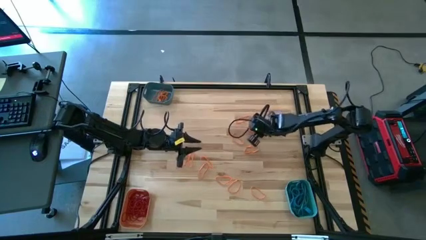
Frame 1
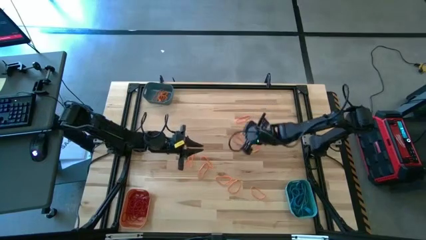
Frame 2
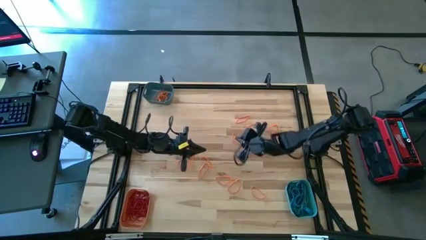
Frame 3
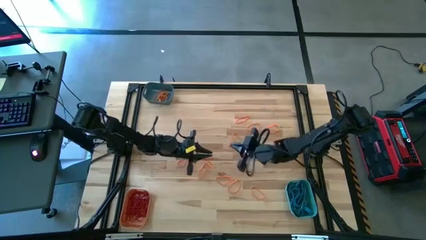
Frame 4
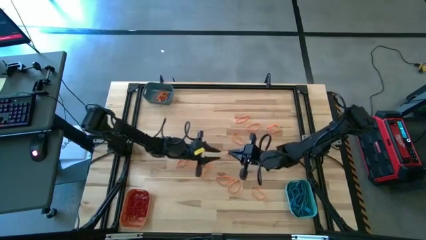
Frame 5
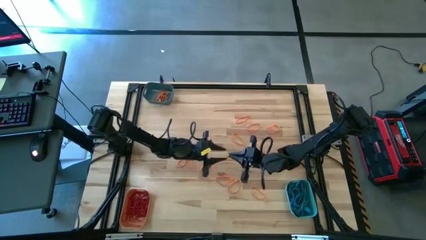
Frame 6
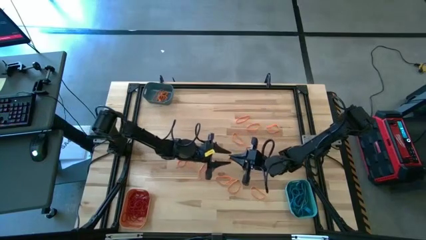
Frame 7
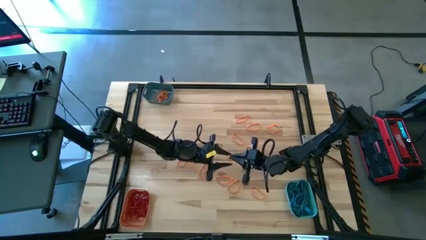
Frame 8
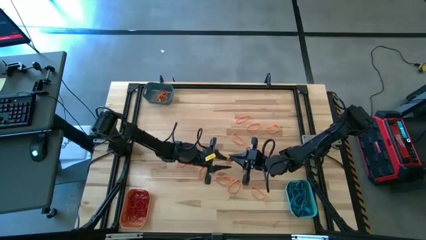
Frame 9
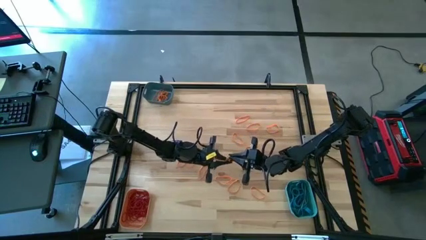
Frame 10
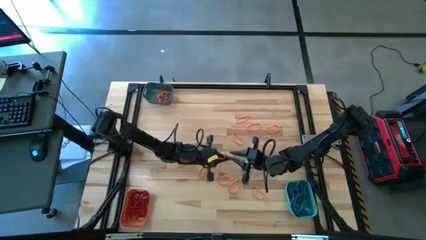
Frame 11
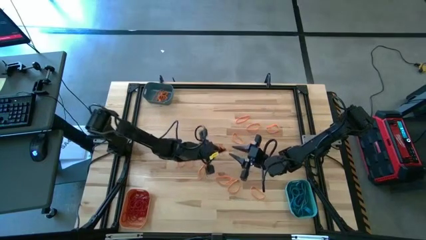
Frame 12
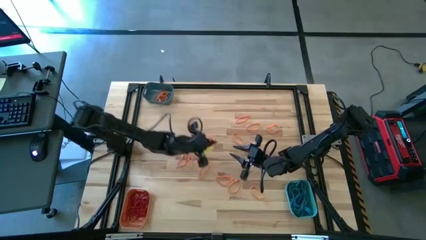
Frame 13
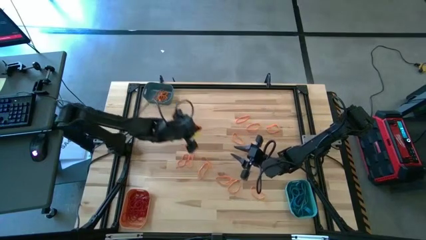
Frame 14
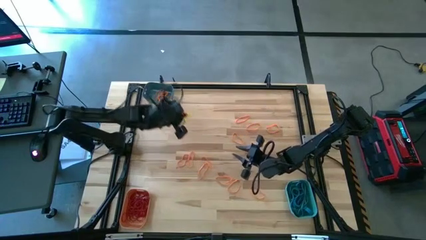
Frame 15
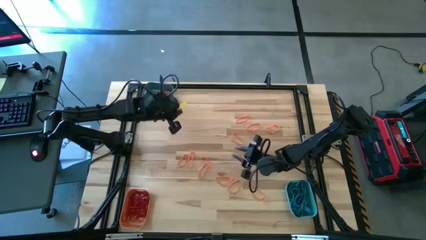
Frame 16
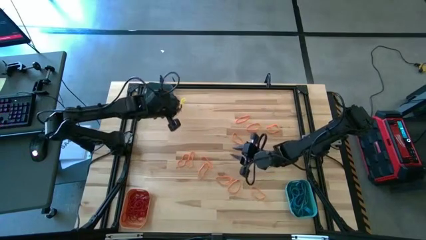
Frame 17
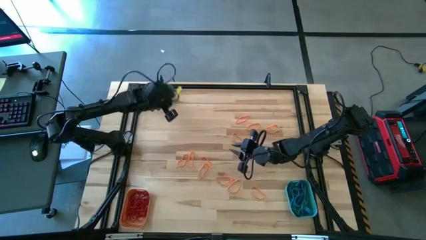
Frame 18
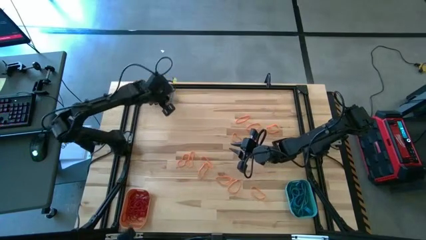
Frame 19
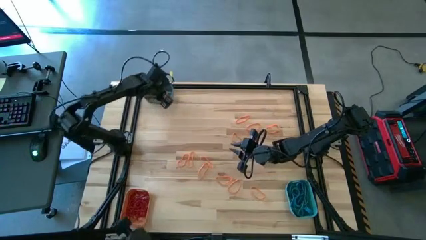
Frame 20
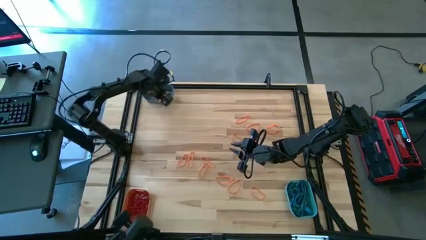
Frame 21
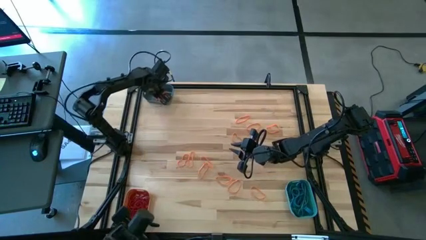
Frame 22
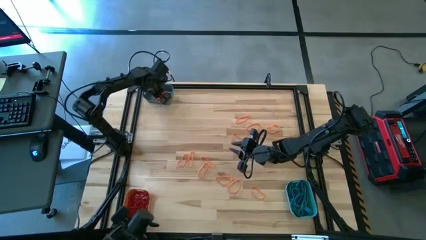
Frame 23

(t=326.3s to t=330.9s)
Task: Sort rubber bands into baskets
Put the orange rubber band into the blue bin

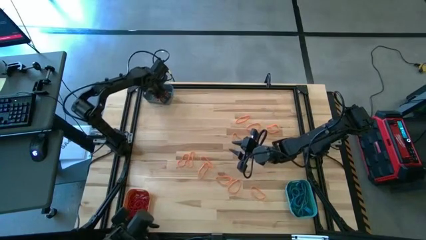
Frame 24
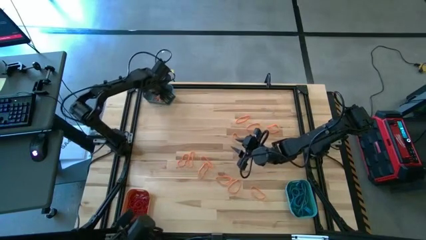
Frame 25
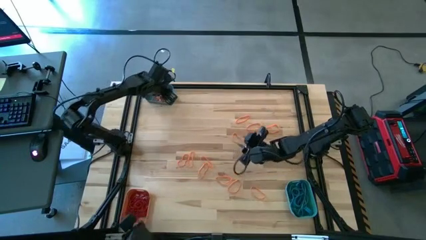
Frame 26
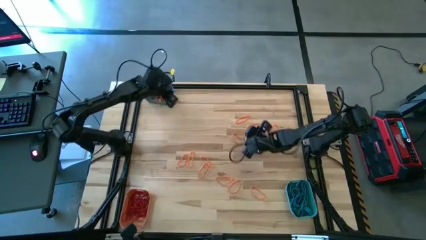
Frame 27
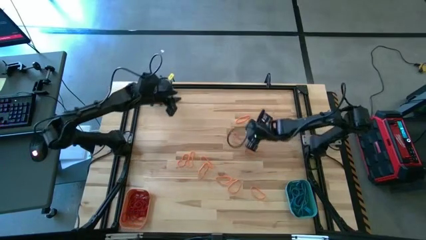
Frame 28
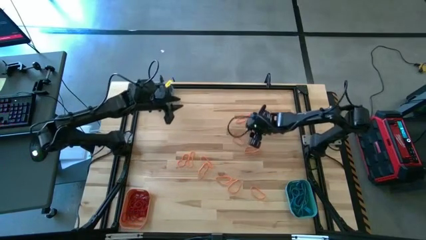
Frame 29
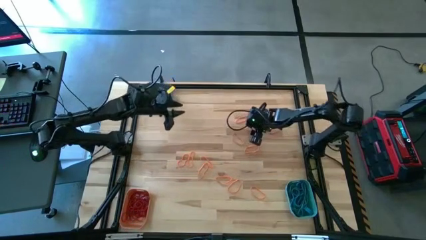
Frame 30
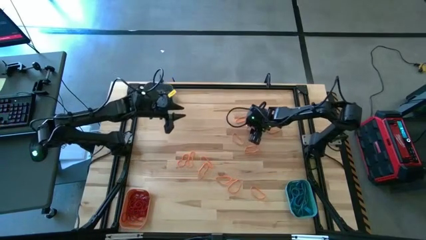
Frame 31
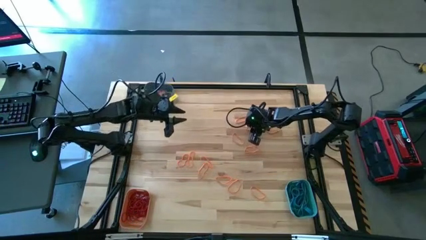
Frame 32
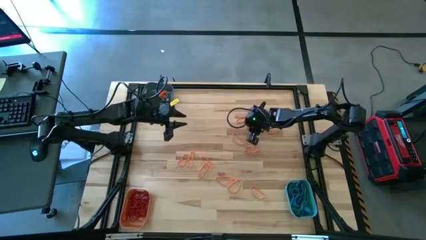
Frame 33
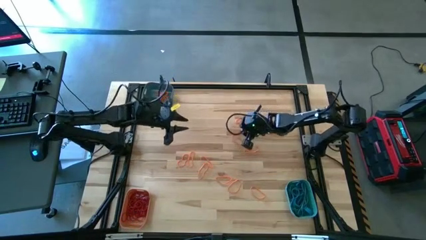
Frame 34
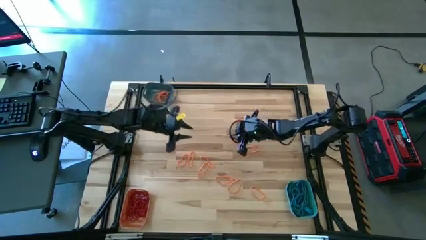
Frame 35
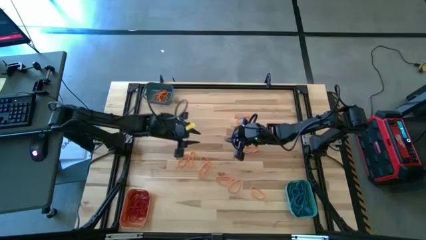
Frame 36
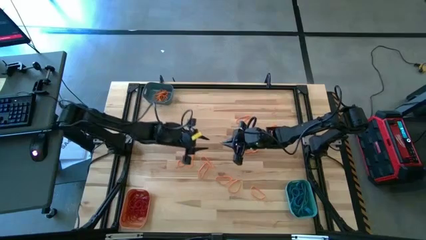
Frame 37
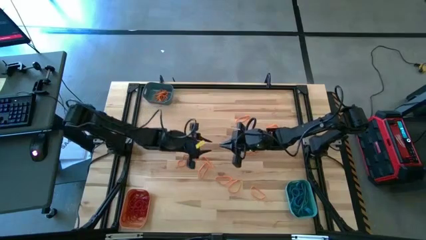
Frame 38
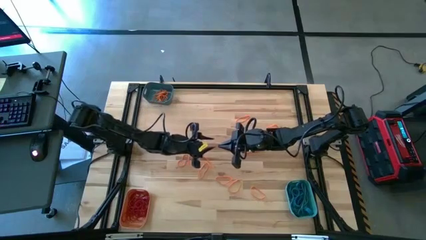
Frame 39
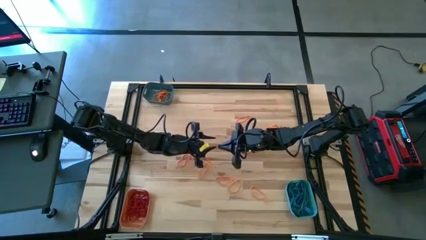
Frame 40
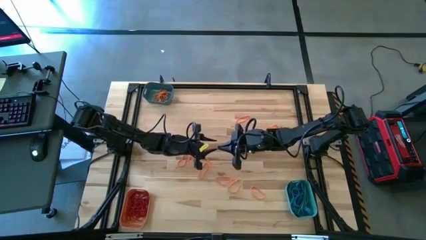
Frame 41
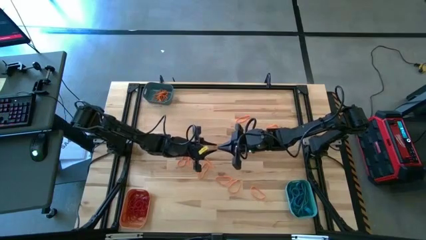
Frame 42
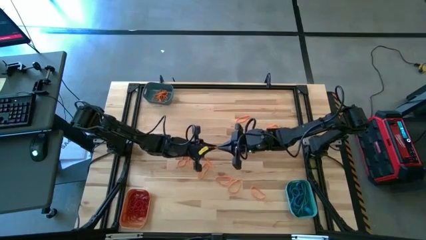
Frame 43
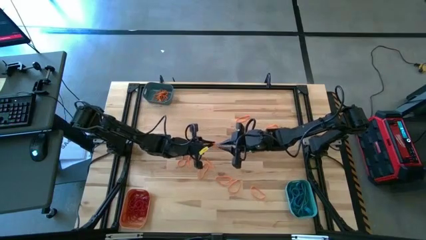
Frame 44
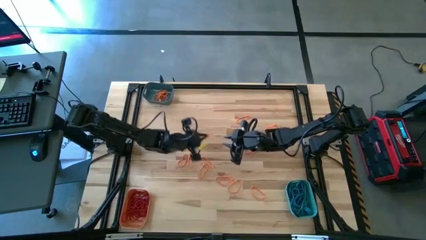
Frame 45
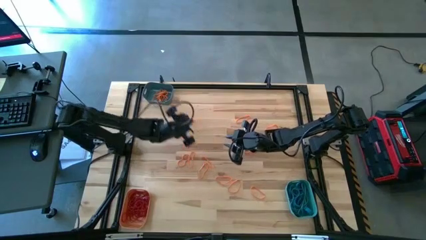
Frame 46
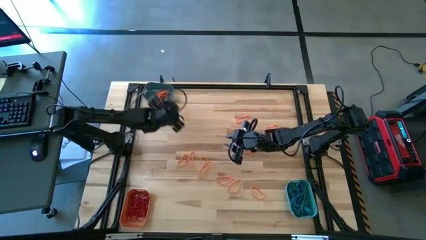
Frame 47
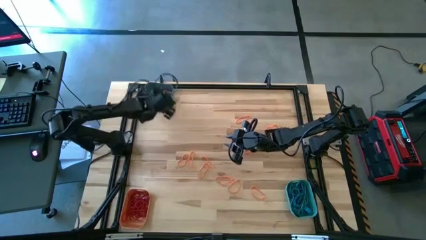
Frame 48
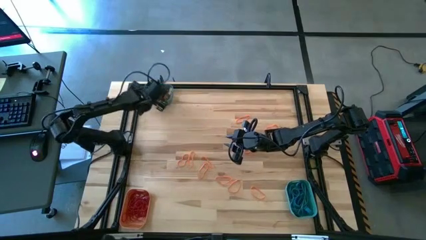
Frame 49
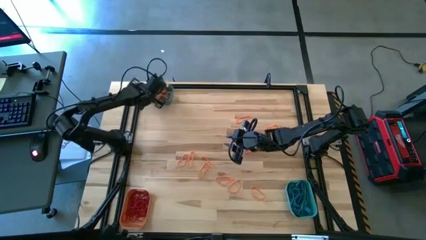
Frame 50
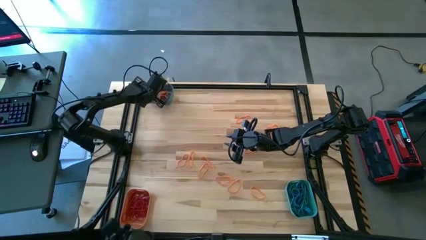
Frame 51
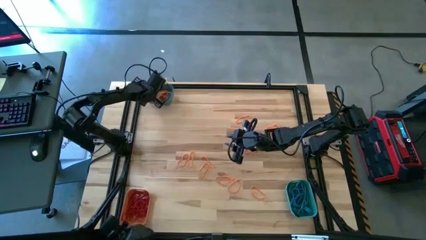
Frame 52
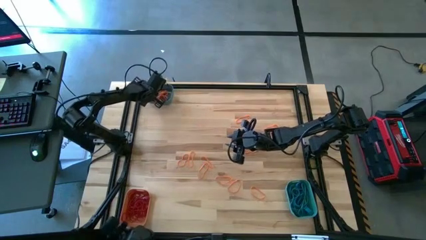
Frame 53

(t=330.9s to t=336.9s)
Put the orange rubber band into the blue bin

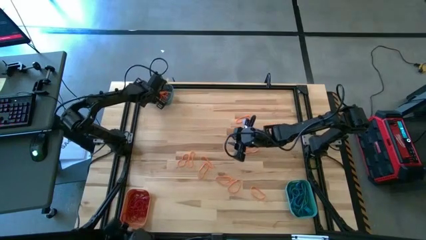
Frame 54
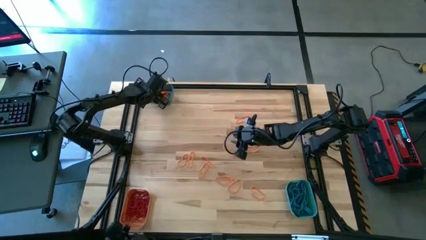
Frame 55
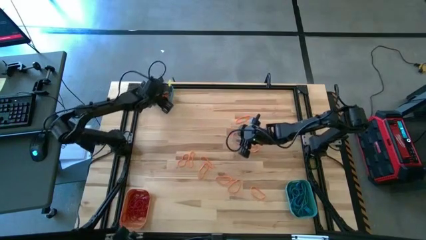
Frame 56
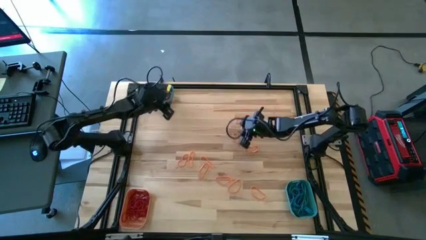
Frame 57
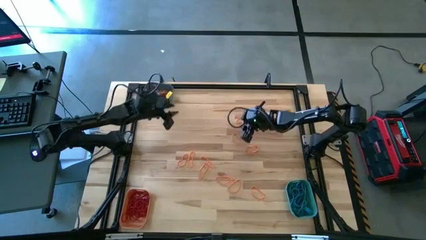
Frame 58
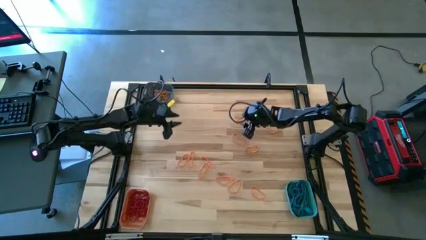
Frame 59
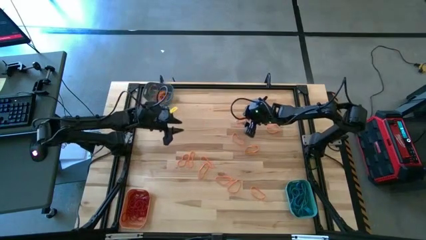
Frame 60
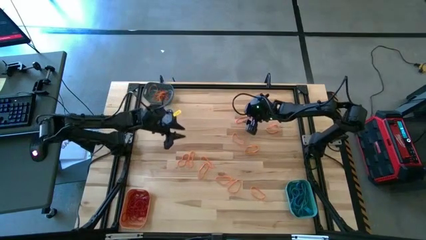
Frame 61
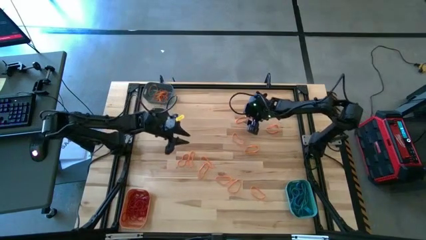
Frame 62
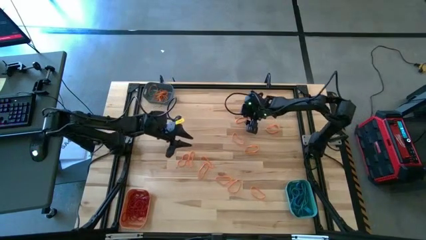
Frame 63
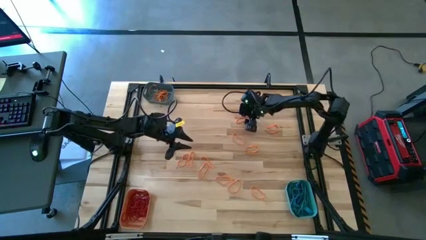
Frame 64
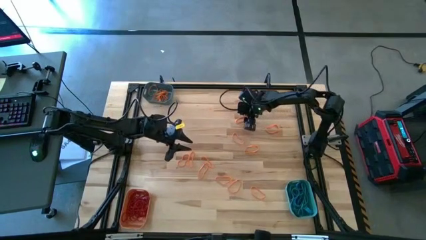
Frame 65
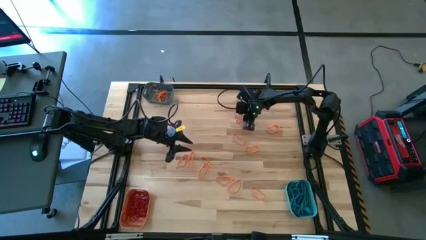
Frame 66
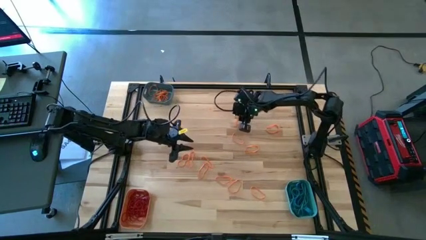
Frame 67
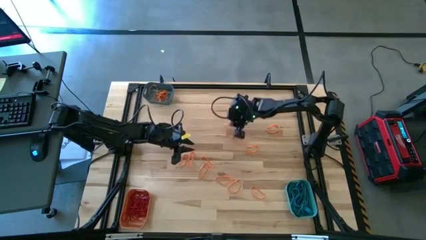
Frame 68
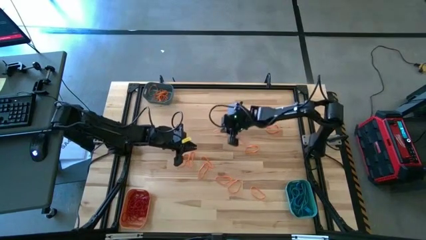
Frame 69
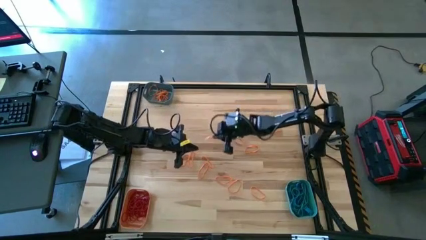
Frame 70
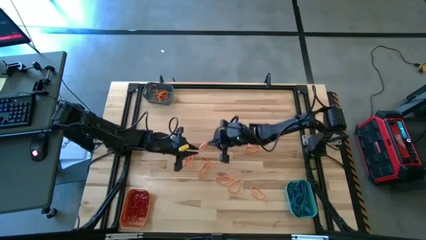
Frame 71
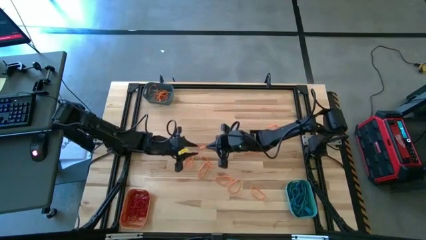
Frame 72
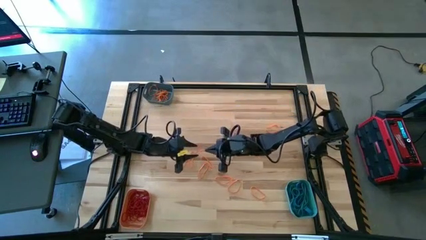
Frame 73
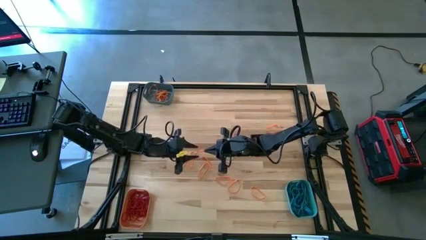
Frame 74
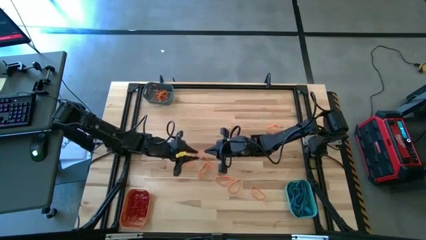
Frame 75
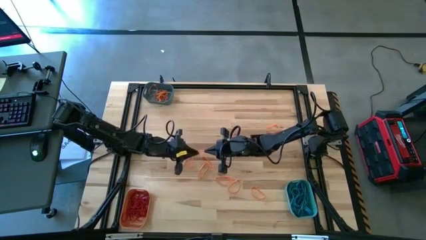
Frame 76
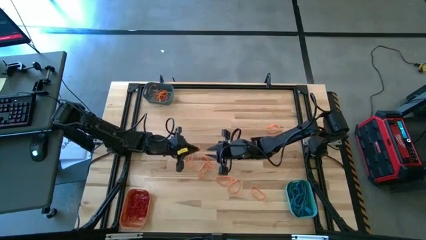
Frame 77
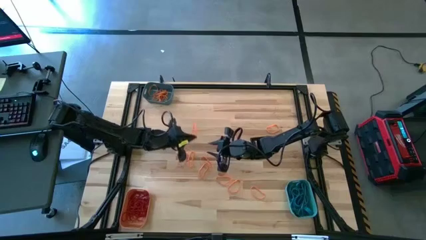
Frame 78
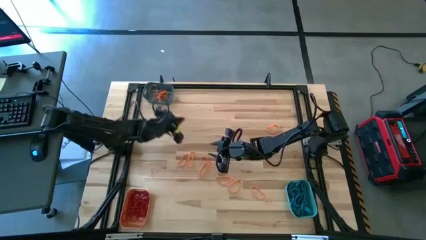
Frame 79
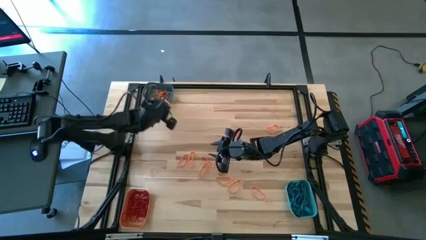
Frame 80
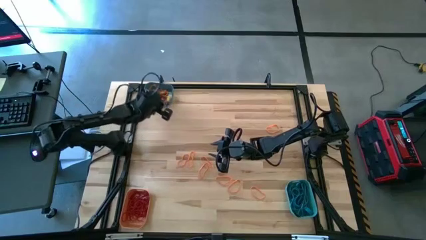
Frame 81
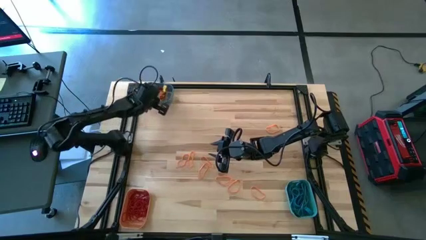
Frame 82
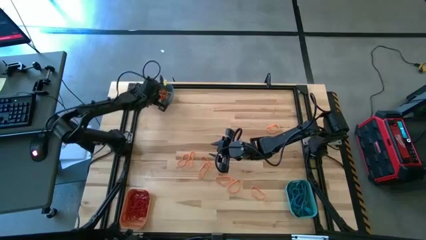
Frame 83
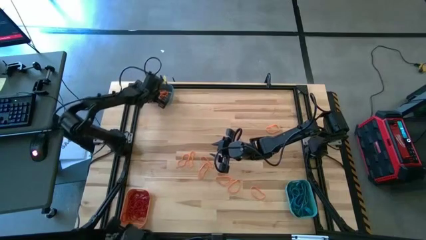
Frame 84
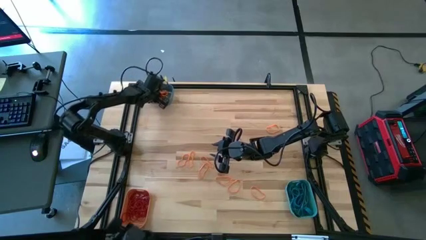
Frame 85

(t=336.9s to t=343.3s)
Put the orange rubber band into the blue bin
